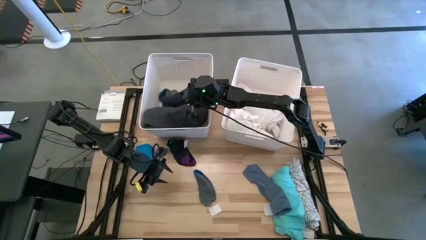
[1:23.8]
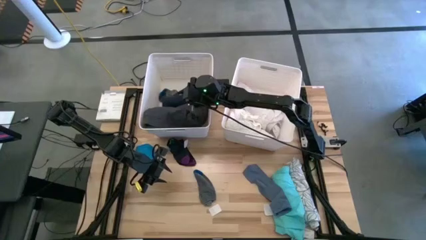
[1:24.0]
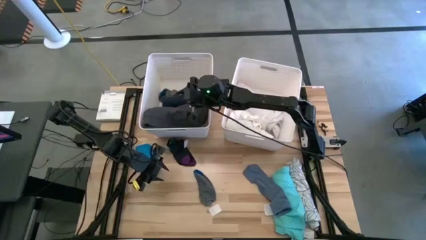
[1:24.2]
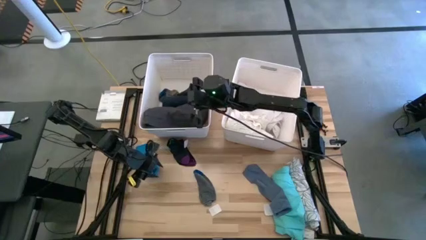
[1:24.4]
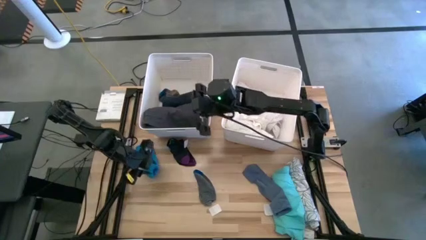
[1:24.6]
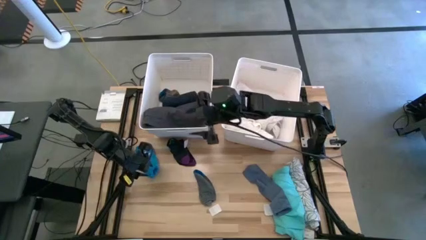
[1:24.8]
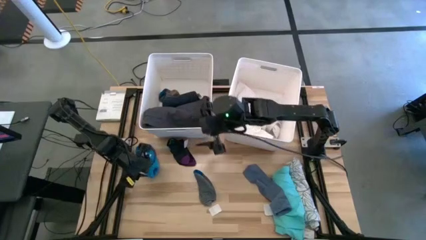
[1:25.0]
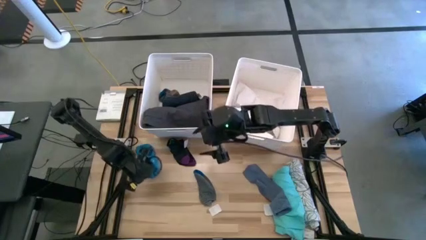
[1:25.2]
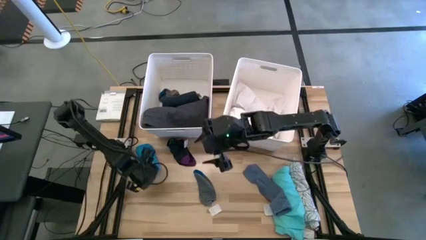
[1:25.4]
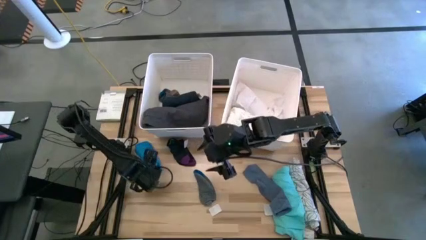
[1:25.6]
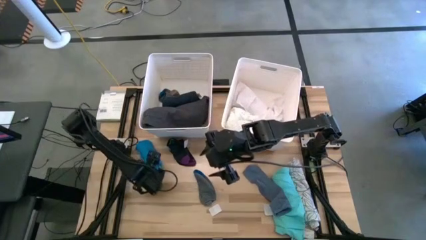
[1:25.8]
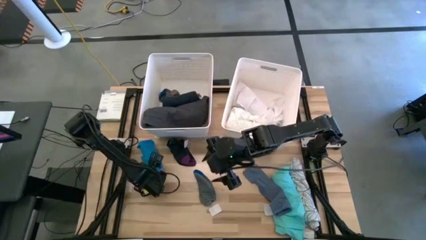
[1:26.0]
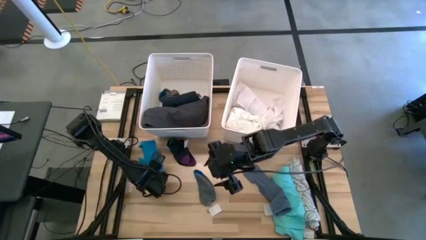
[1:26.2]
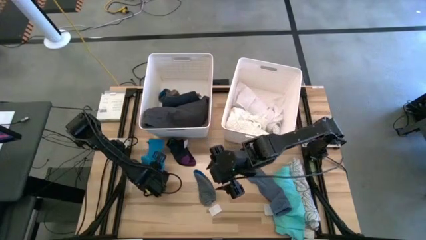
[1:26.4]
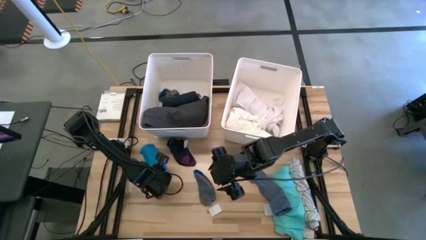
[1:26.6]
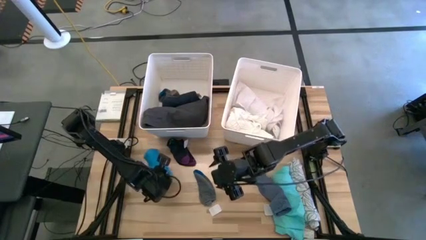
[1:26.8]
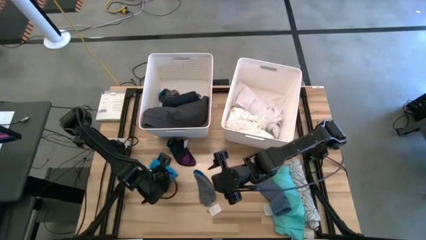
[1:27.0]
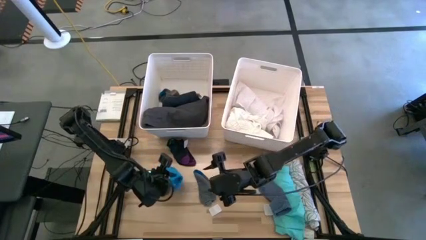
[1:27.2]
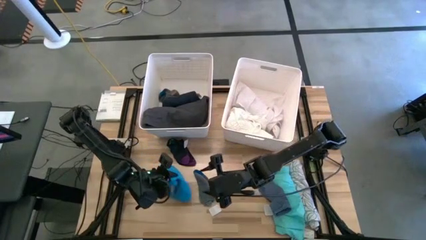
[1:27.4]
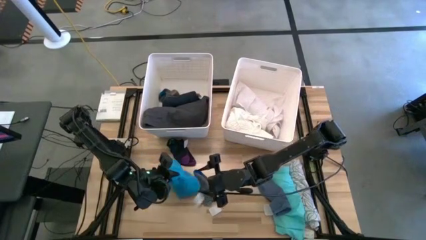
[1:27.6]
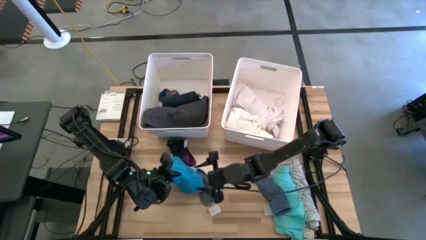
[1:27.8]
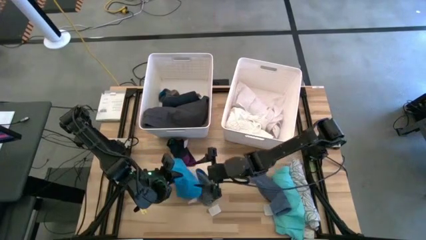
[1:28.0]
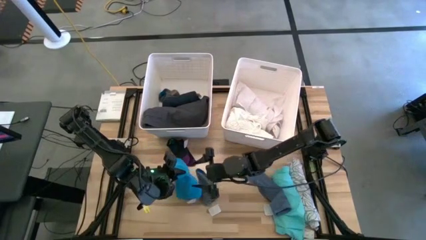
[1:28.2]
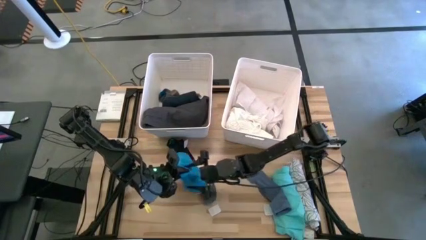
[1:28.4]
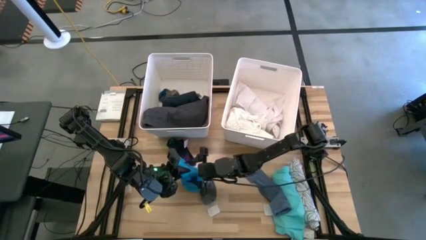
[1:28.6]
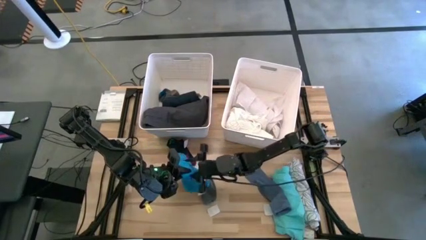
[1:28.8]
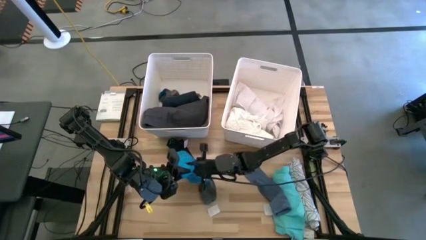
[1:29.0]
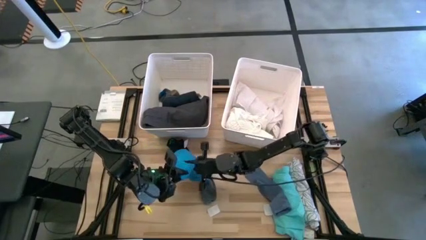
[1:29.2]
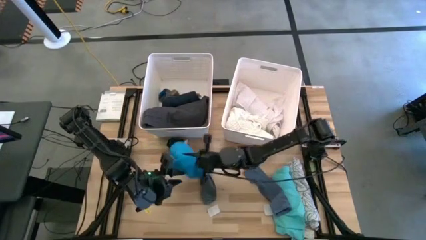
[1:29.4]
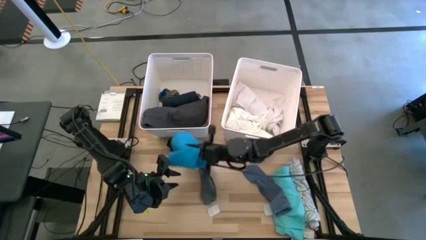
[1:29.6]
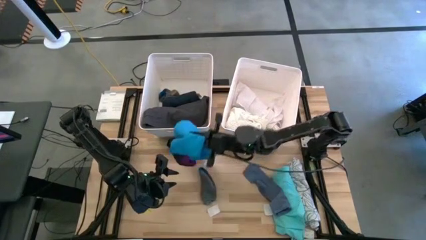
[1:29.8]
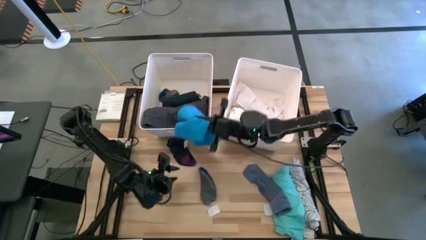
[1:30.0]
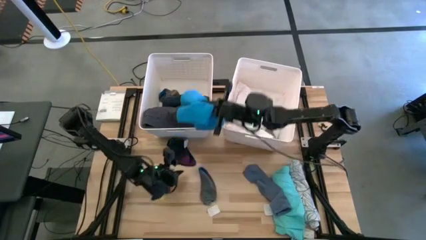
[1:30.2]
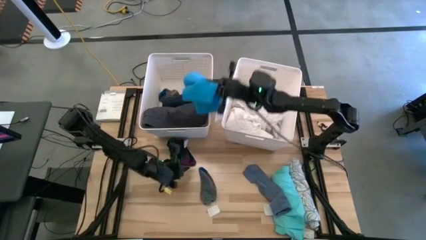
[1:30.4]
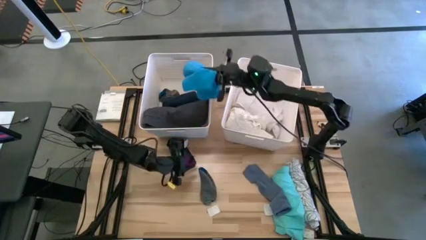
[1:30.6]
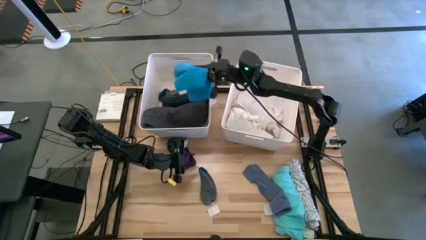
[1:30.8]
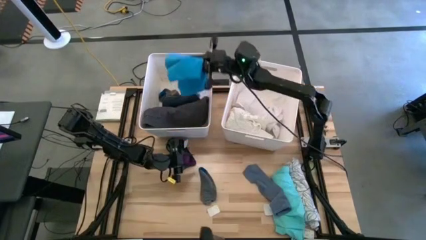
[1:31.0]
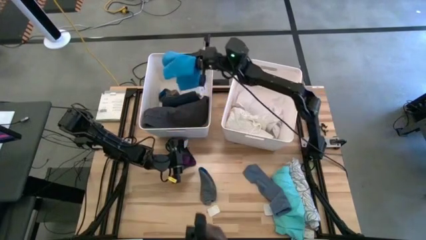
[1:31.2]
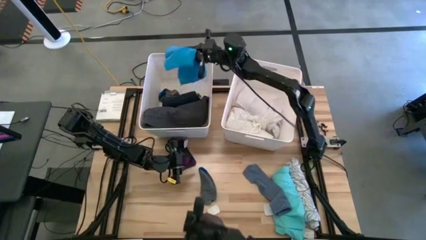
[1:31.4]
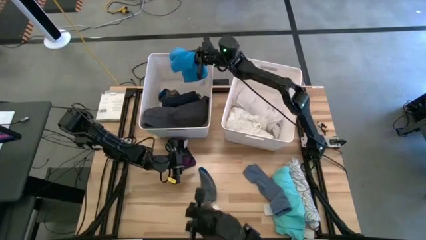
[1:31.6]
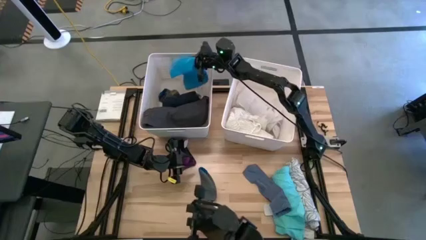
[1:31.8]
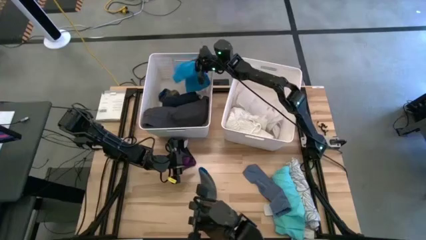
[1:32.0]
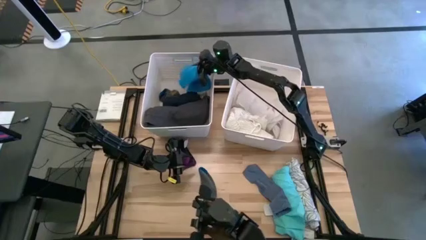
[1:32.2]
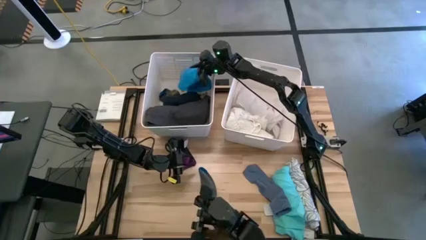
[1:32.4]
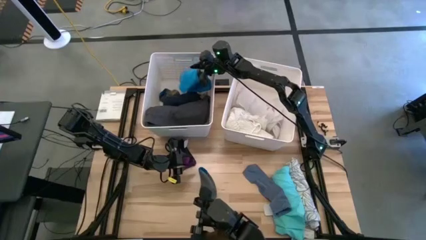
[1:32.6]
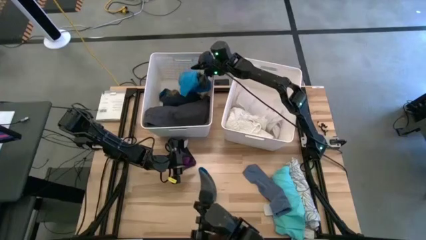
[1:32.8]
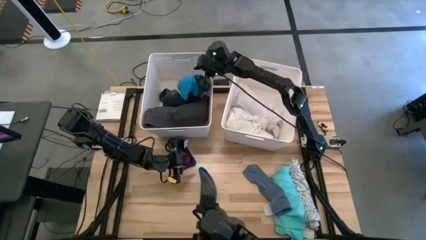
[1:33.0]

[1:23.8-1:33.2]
Task: Sort clothes
Put the rolled blue pants into the left white bin

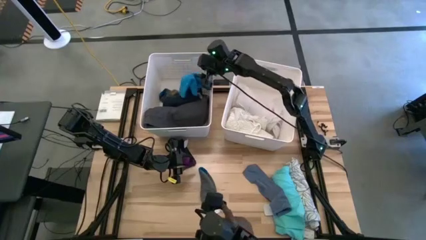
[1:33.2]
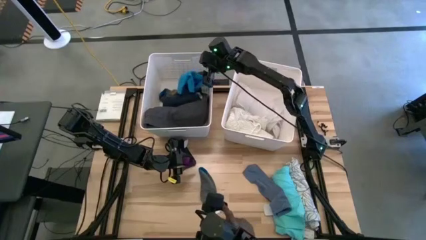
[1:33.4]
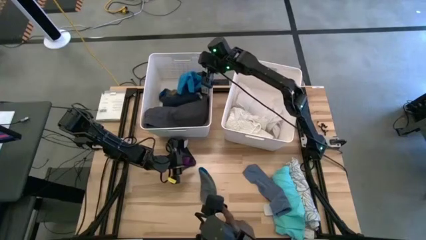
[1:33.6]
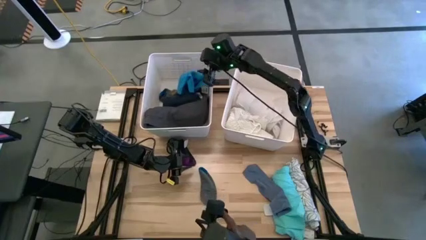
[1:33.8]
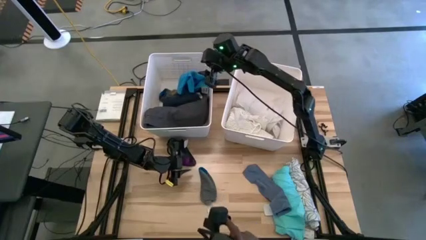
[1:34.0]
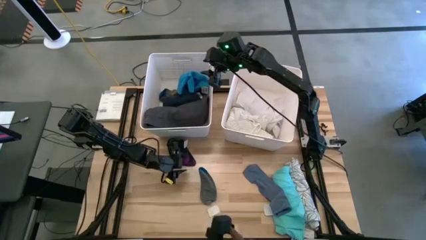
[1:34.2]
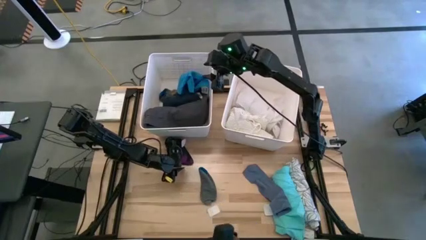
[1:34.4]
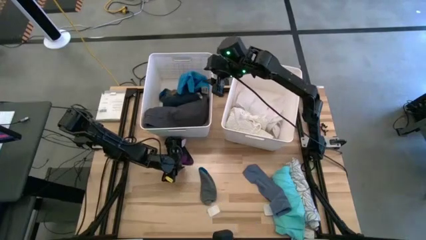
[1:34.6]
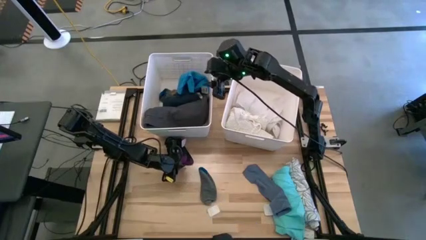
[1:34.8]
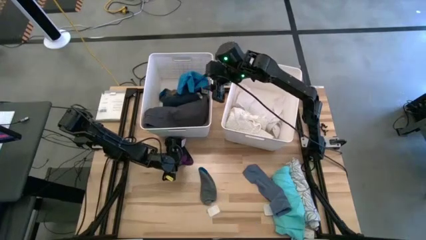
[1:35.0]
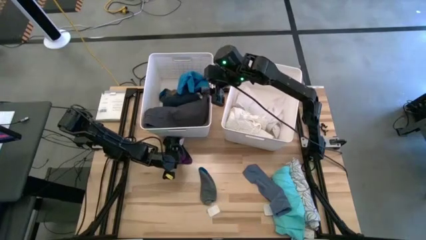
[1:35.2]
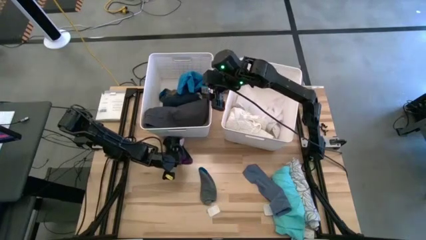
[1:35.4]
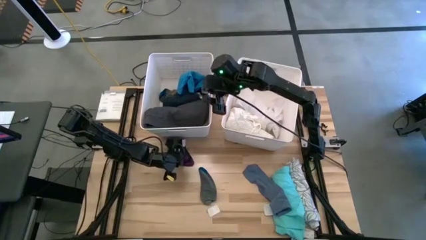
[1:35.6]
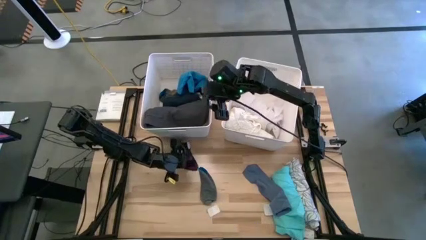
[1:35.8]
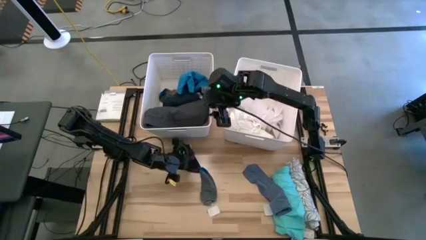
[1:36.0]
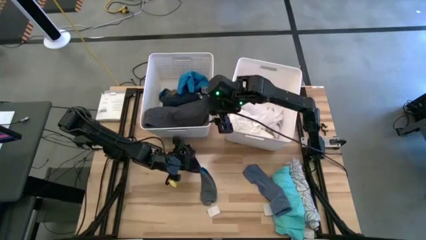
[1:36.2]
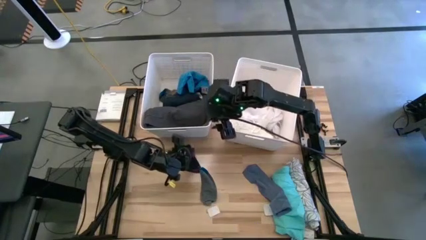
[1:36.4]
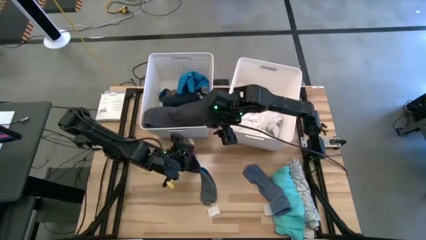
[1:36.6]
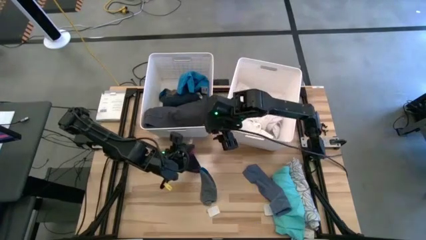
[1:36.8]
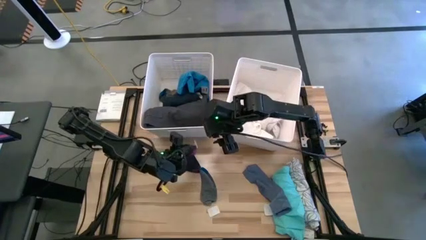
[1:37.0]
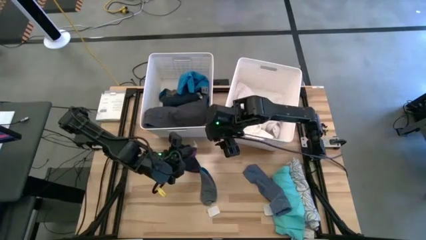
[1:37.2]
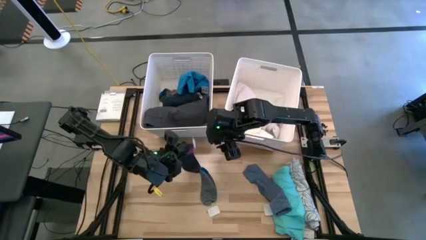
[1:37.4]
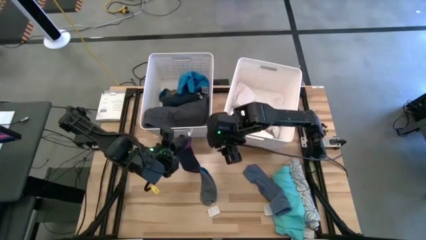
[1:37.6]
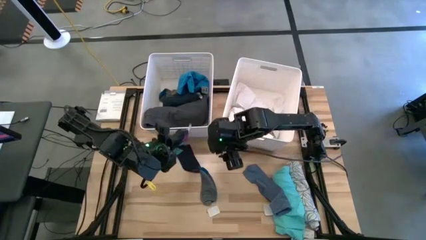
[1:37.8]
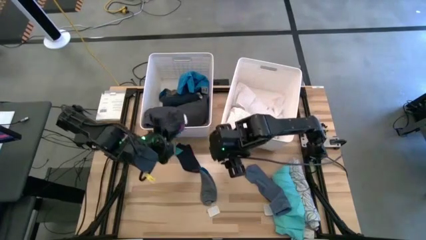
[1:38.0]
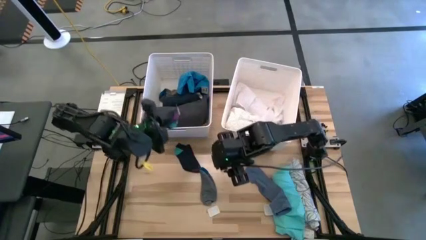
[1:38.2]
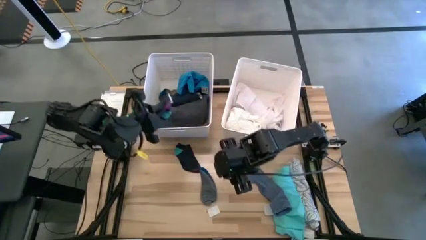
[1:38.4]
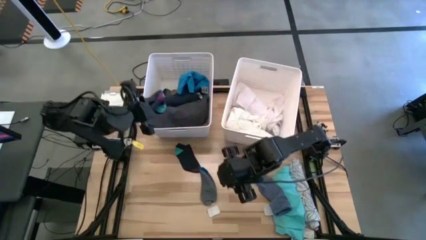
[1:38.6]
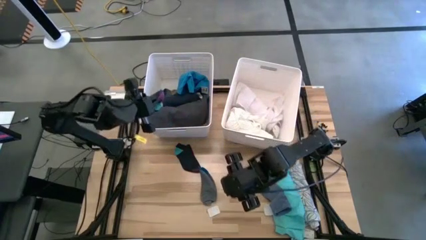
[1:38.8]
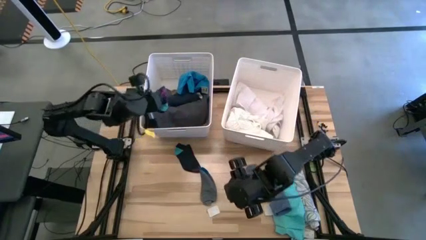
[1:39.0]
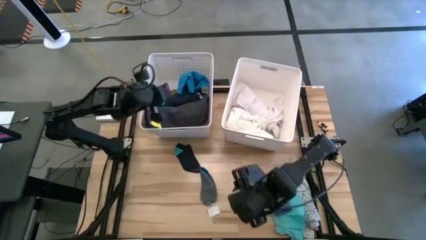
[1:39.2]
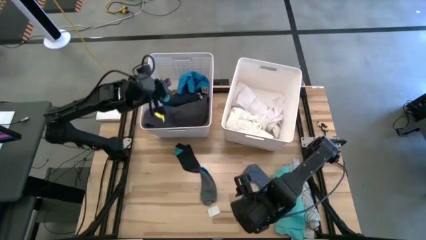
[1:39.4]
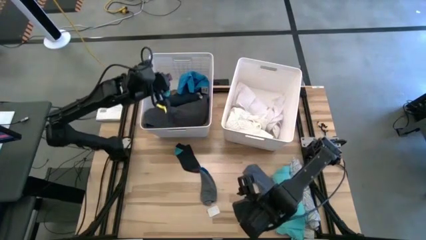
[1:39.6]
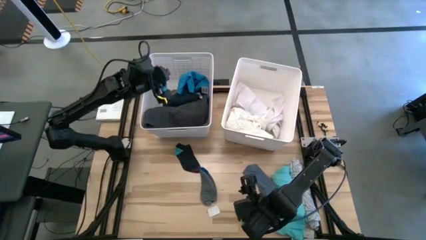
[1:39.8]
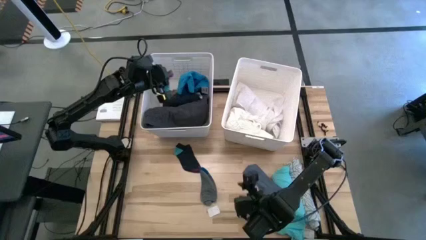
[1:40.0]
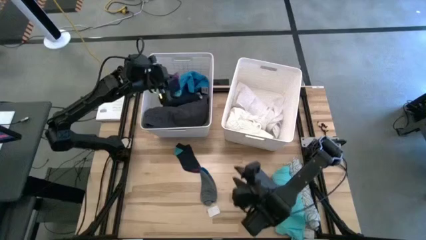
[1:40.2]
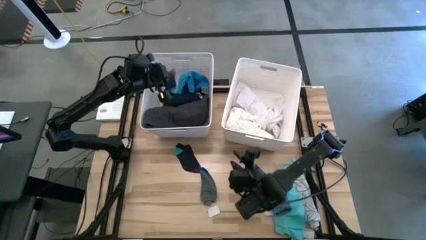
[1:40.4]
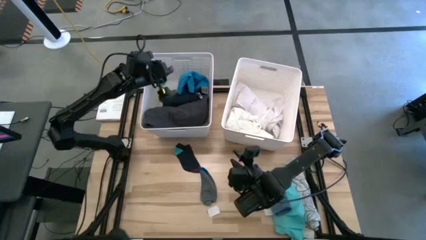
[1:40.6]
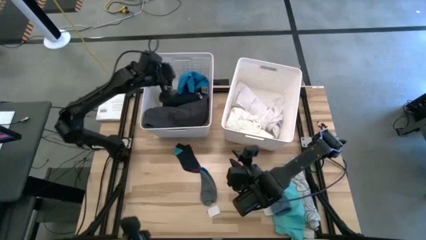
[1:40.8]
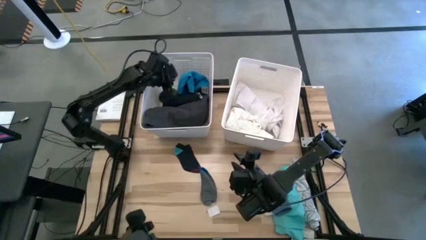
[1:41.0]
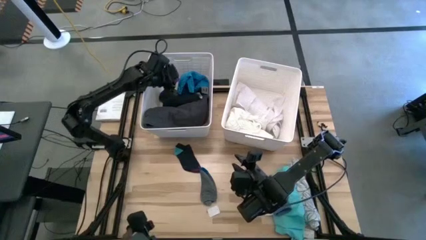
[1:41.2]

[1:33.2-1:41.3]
Put the purple sock into the left white bin
